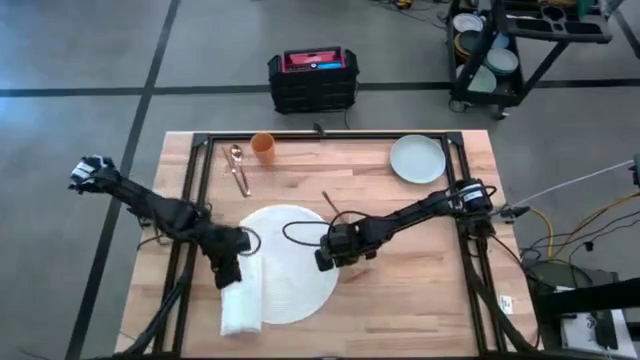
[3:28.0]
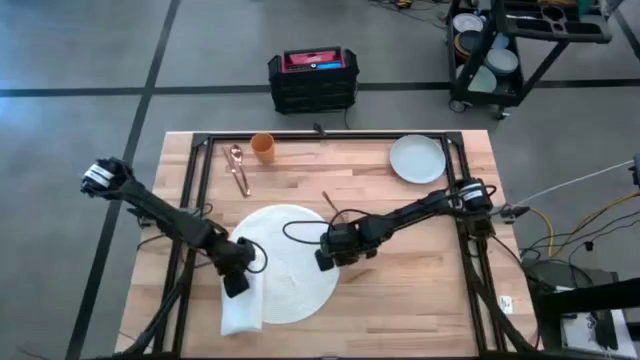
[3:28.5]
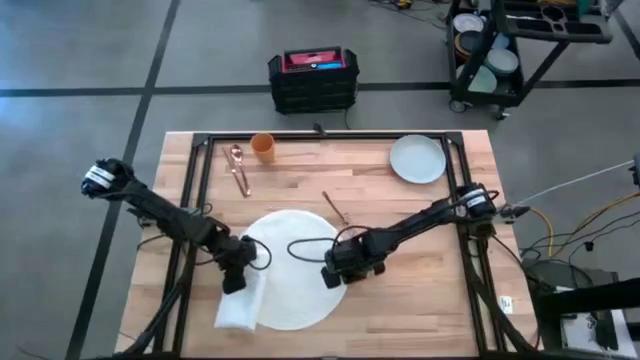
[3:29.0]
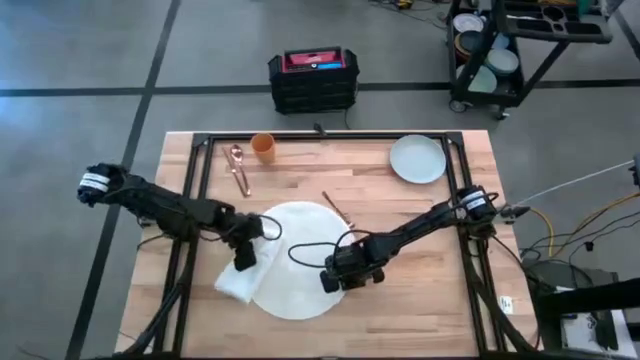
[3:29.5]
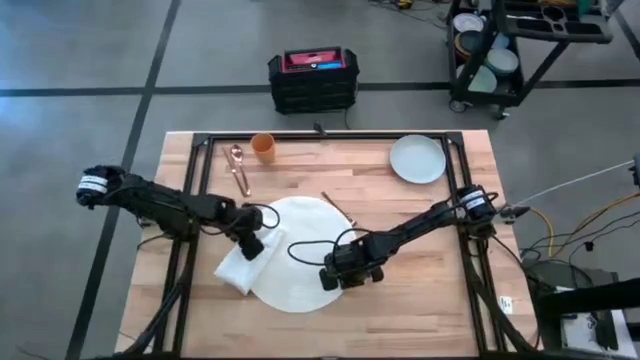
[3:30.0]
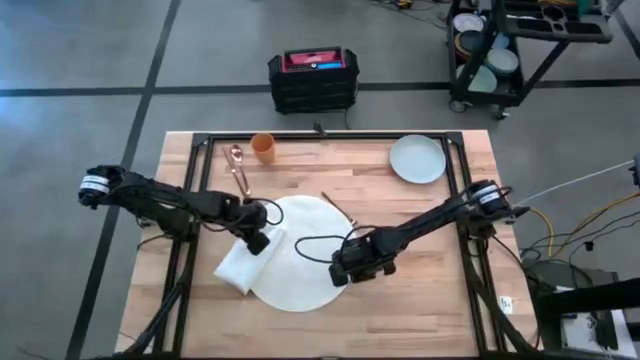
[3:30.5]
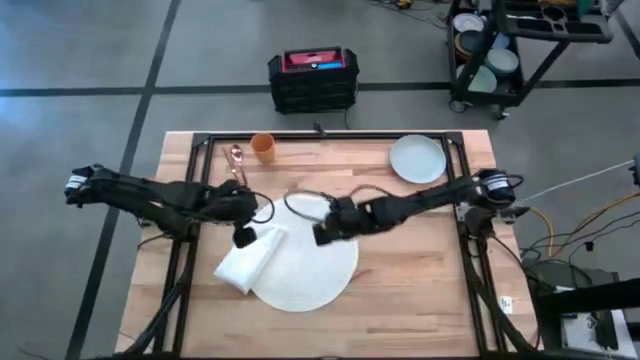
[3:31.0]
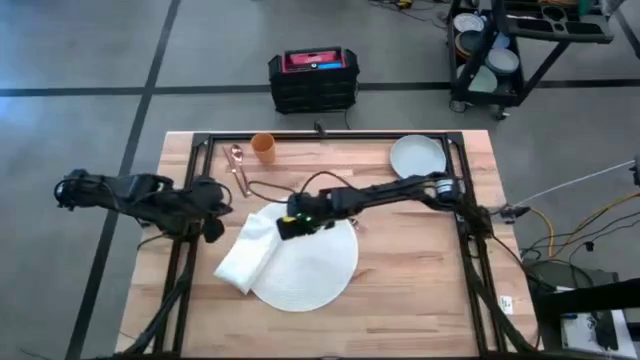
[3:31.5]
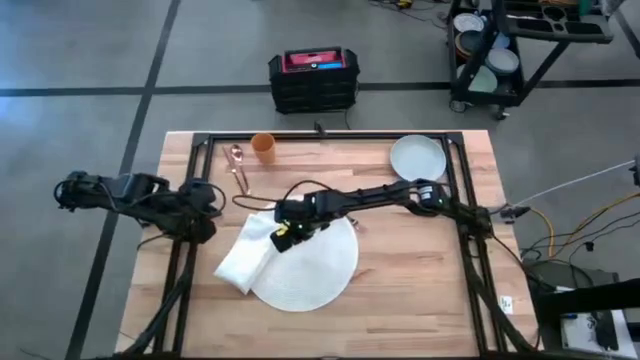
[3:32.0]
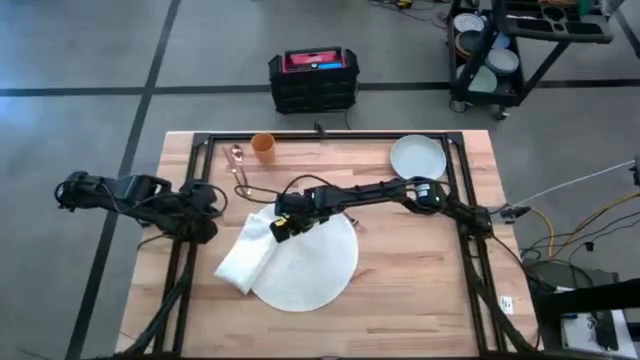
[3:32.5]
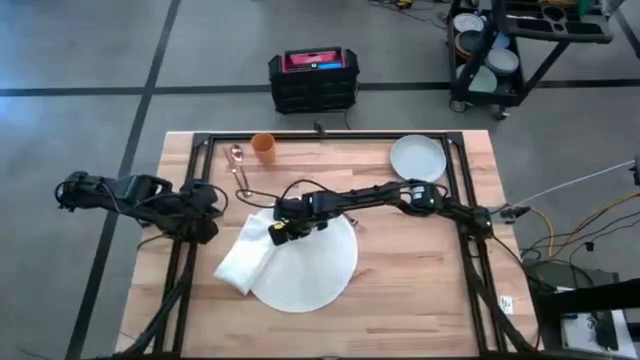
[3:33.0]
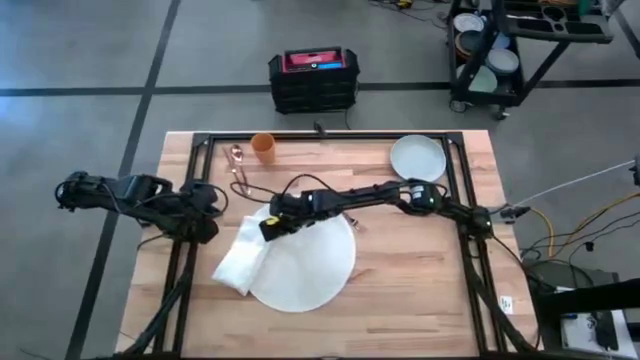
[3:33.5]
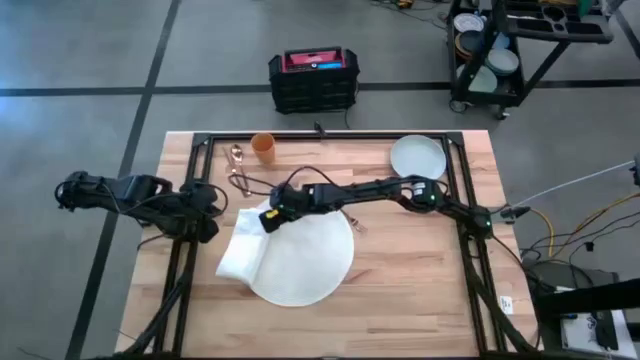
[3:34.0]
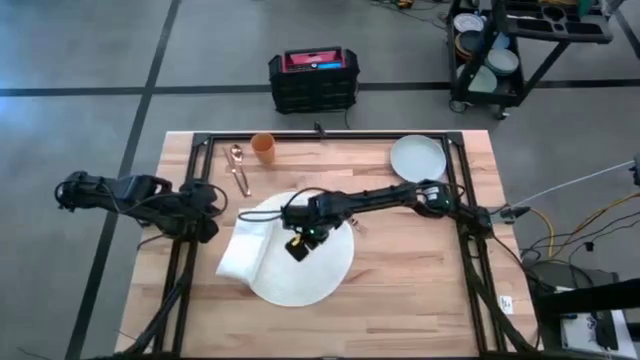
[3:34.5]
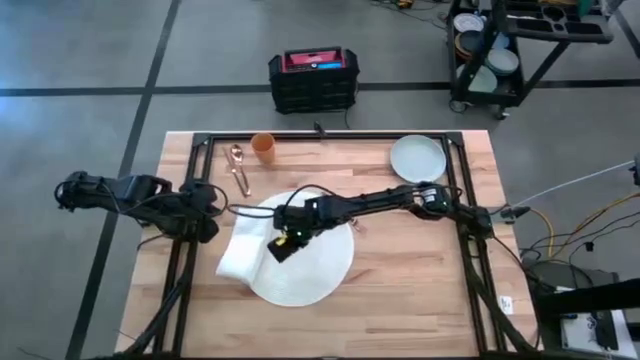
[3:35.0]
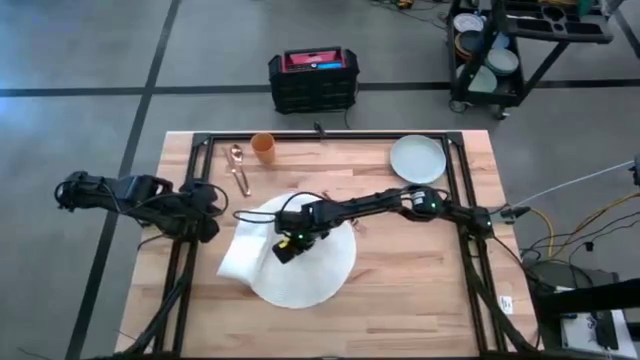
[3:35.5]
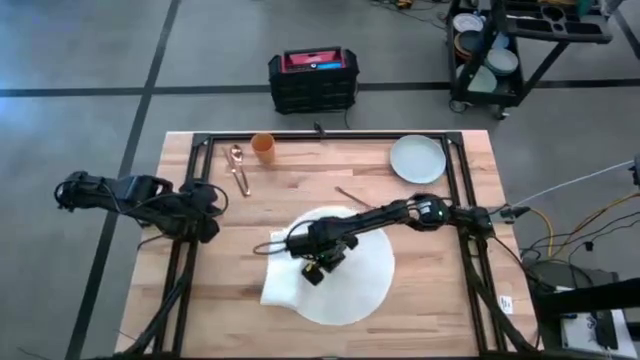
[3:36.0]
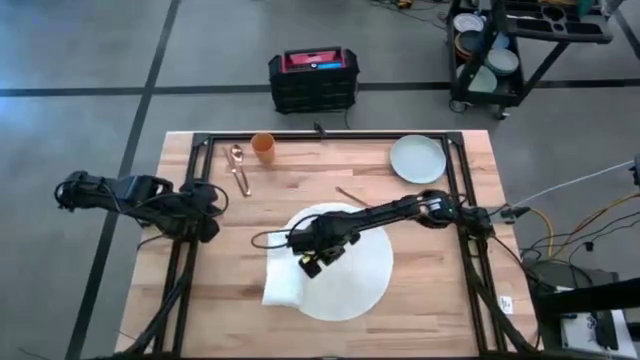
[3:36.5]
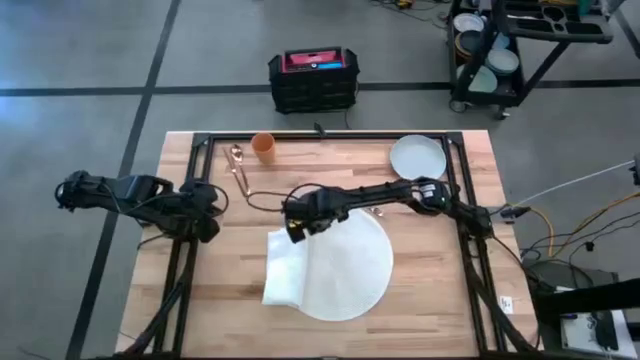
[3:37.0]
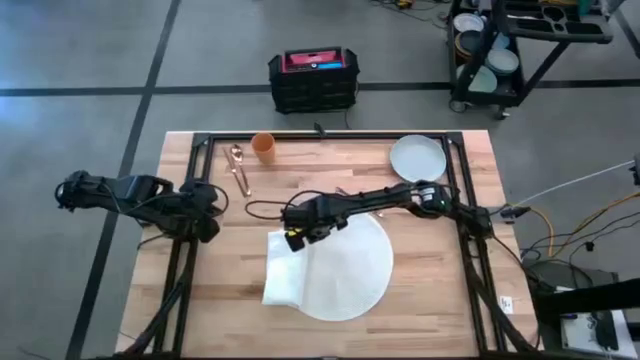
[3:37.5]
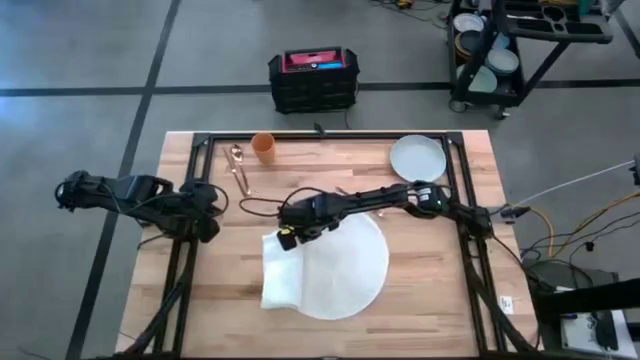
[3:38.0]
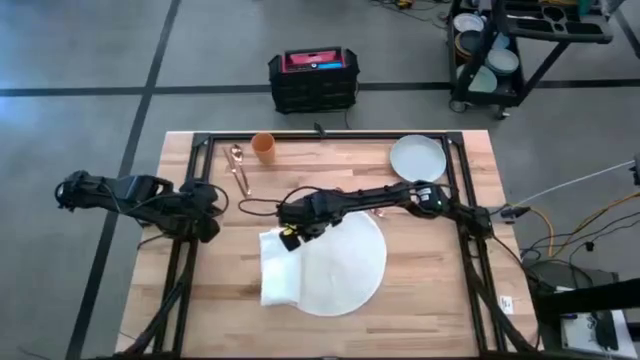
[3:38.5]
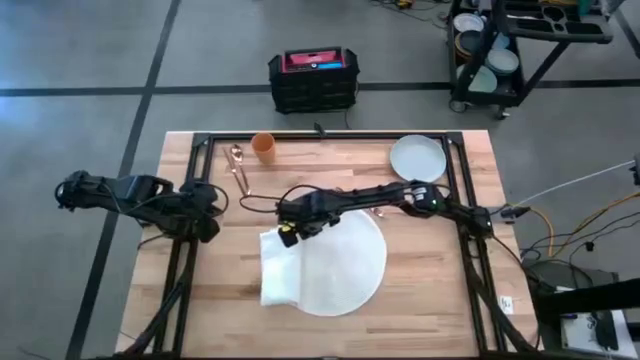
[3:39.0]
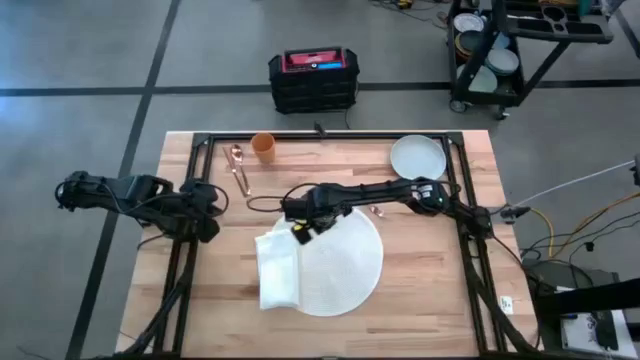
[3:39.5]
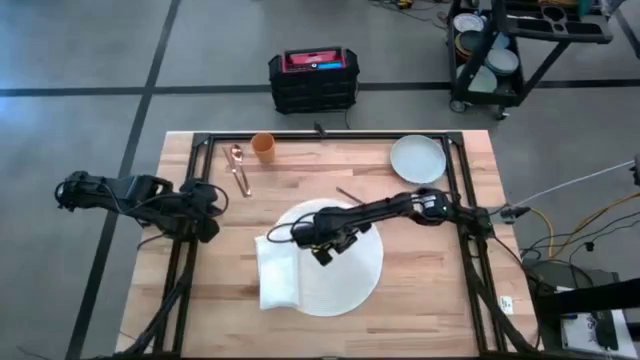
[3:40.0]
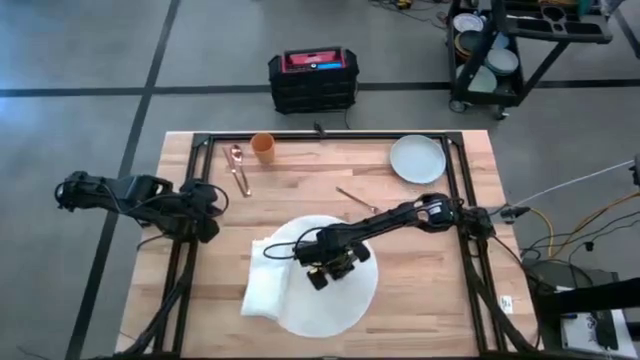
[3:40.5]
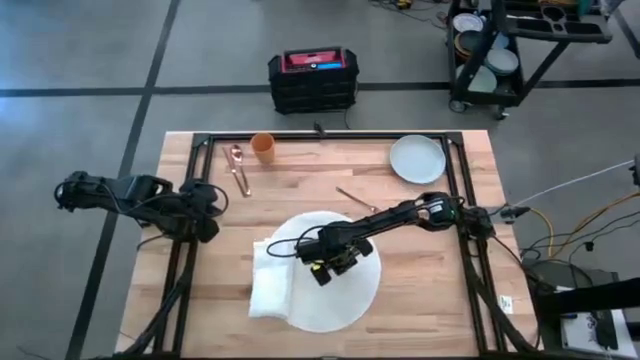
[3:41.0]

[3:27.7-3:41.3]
Task: Set table place
Adjust the white mat on the table

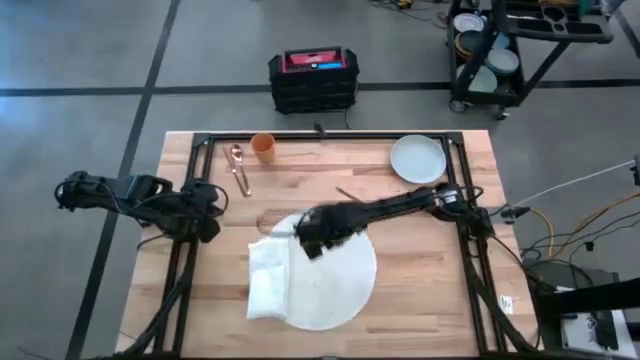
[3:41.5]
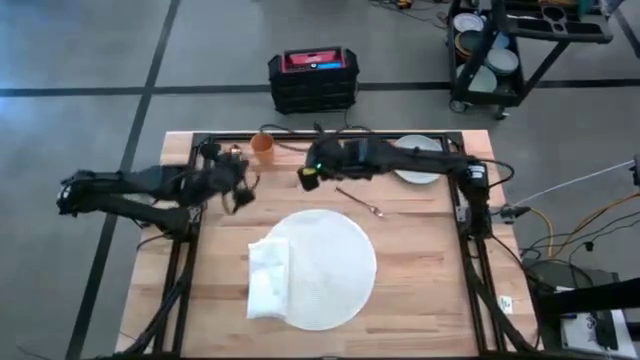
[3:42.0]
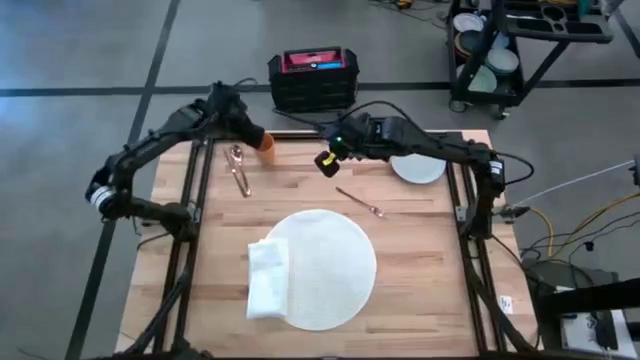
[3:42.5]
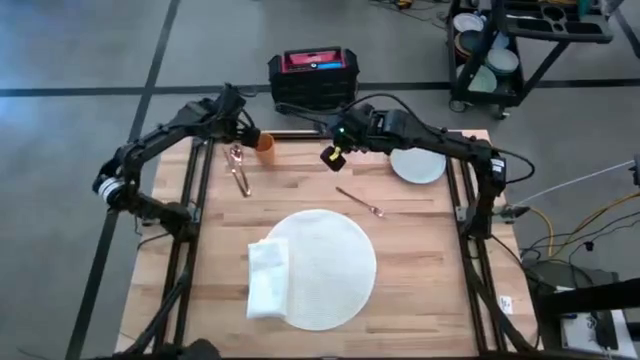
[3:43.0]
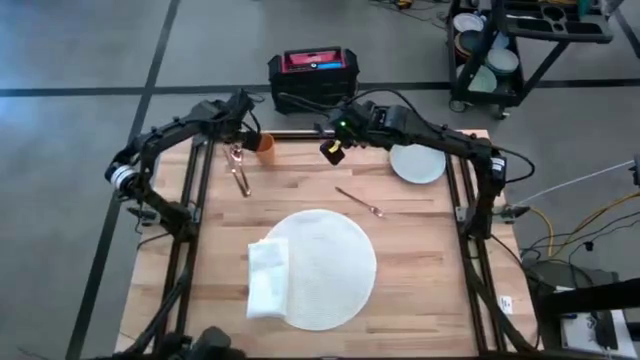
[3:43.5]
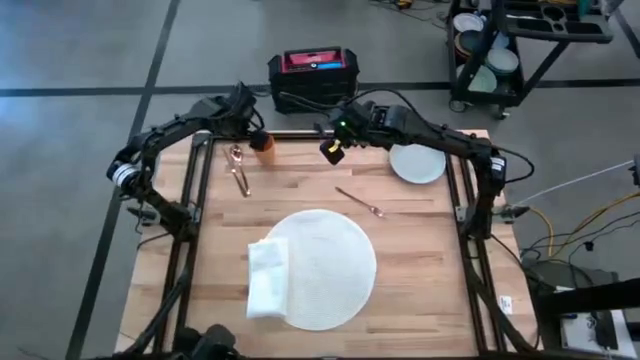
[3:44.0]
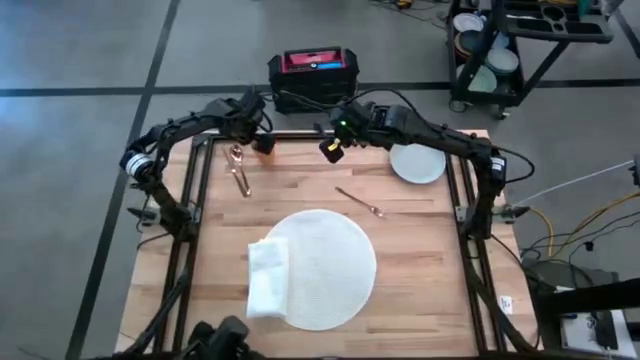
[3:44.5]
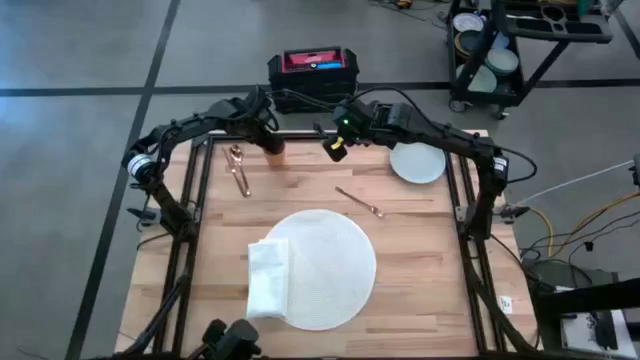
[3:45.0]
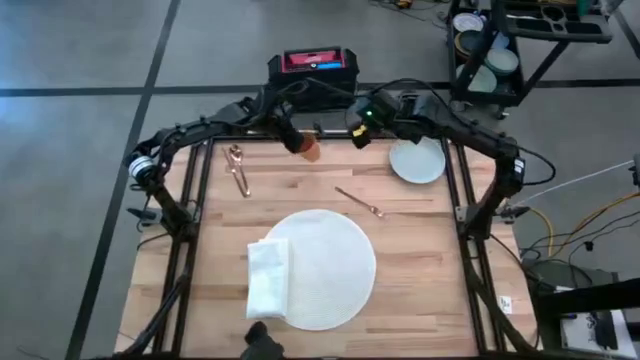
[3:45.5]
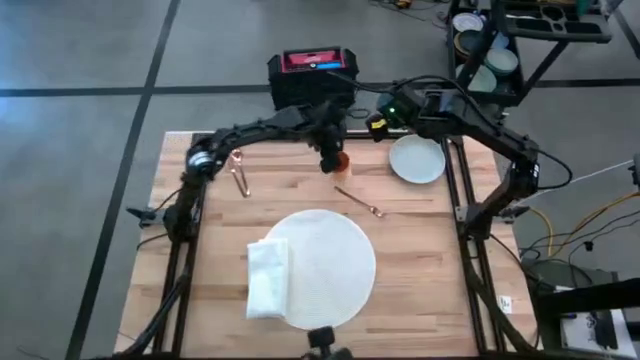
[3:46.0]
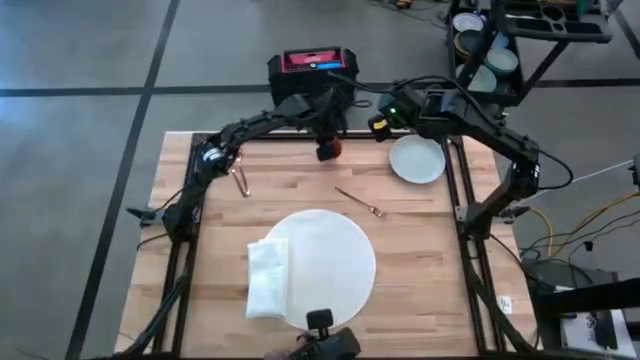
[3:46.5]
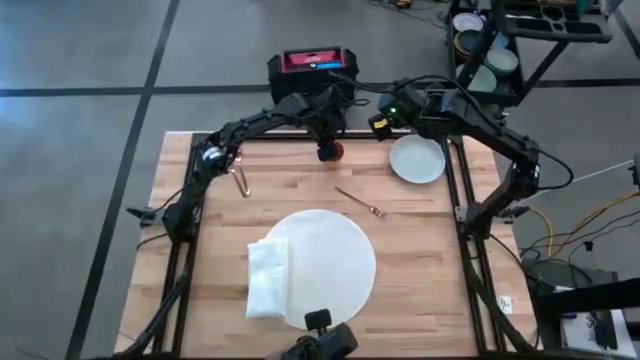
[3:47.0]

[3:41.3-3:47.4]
Move the orange cup to the top center of the table

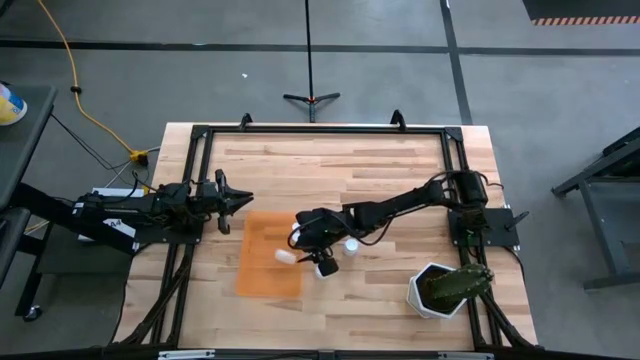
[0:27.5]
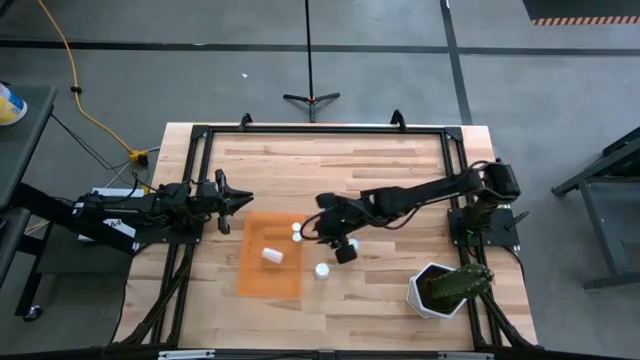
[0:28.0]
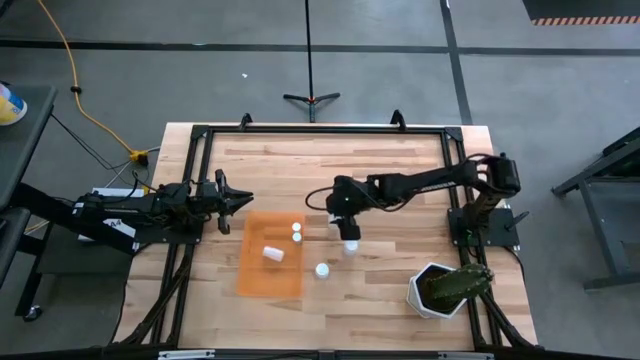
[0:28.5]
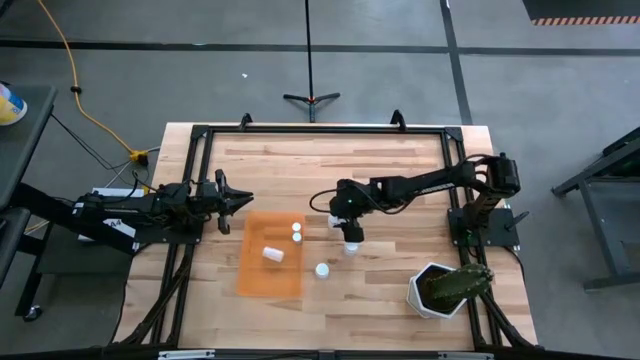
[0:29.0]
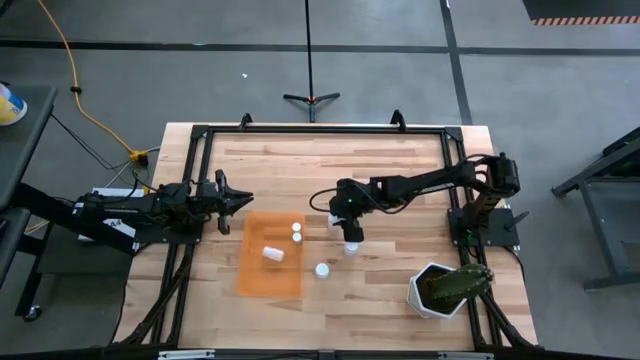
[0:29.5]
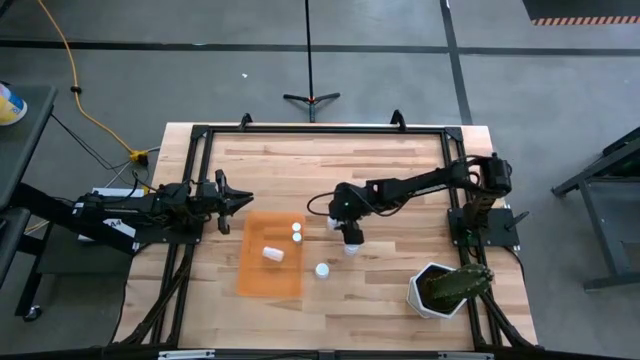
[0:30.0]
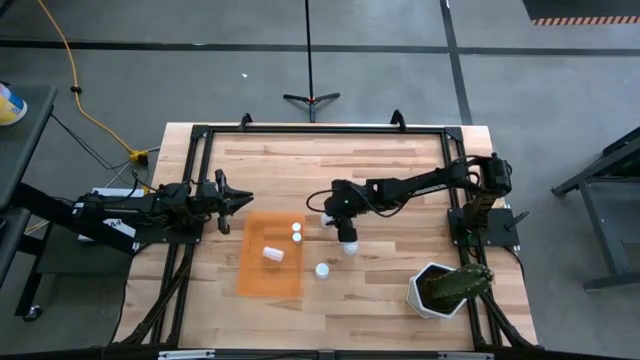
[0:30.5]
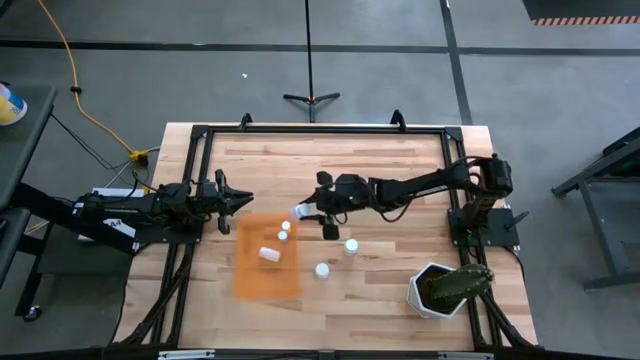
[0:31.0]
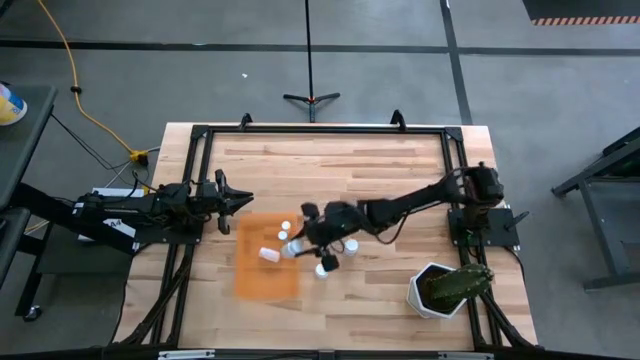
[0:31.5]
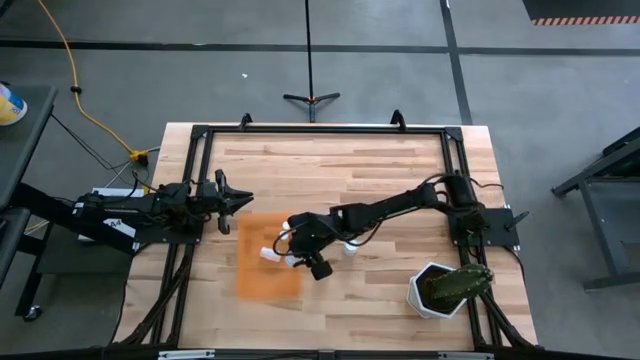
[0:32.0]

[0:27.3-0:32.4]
Task: Pick and place pill bottles into a basket
Put the top white pill bottle into the orange bin
